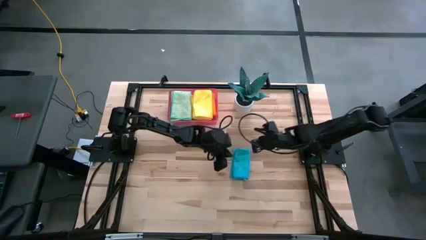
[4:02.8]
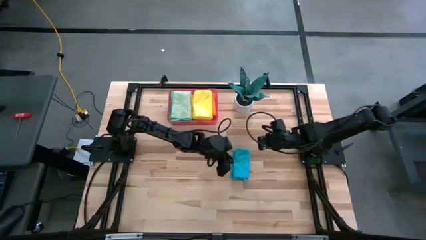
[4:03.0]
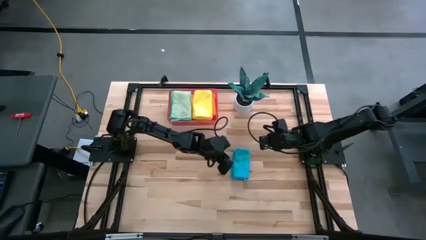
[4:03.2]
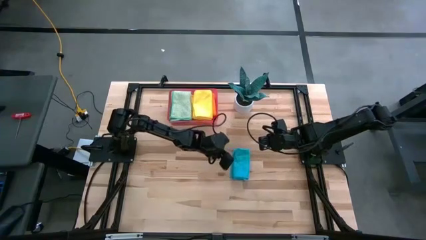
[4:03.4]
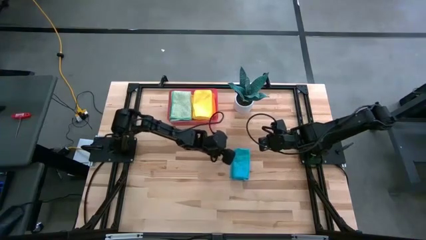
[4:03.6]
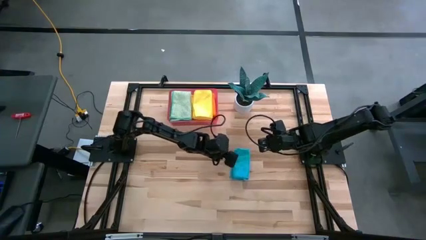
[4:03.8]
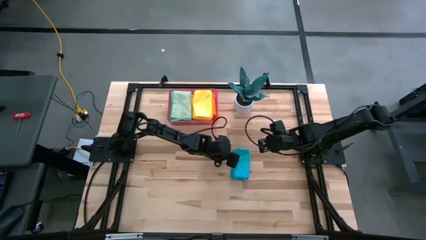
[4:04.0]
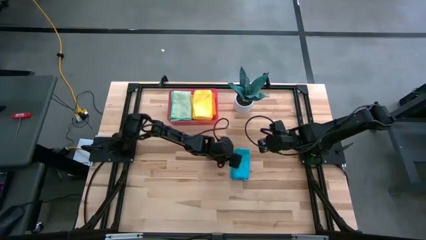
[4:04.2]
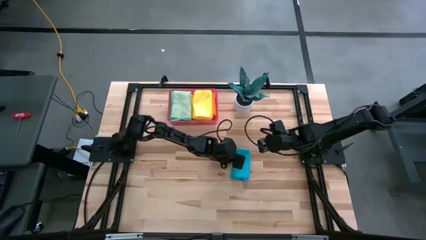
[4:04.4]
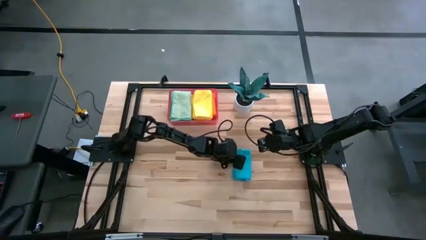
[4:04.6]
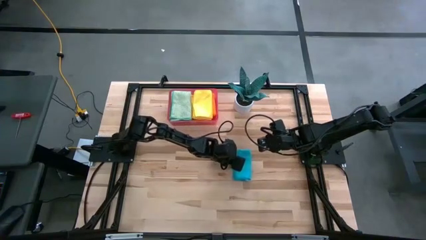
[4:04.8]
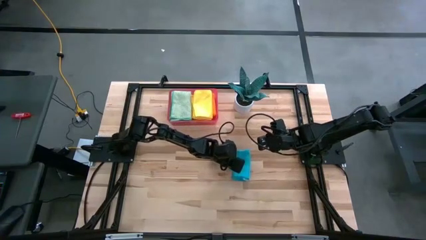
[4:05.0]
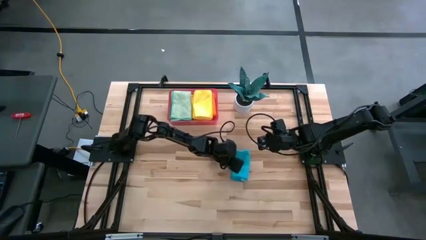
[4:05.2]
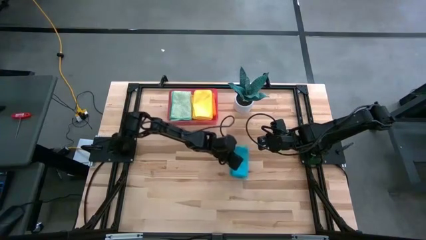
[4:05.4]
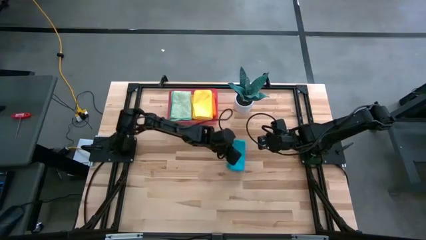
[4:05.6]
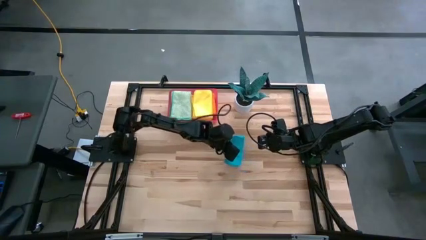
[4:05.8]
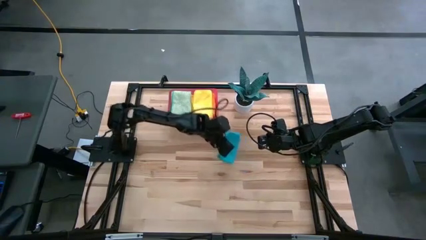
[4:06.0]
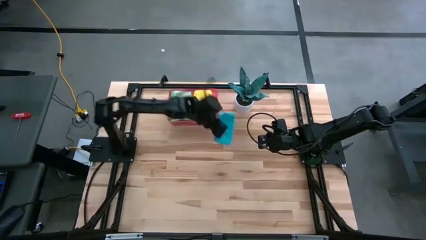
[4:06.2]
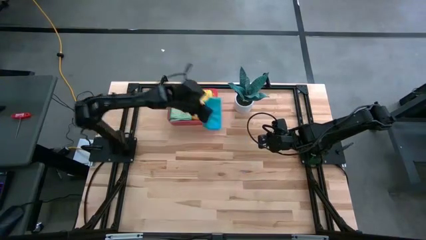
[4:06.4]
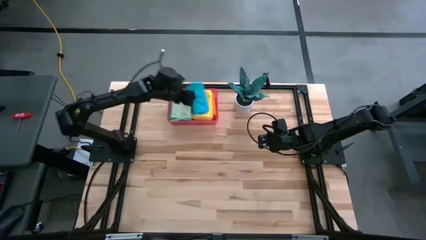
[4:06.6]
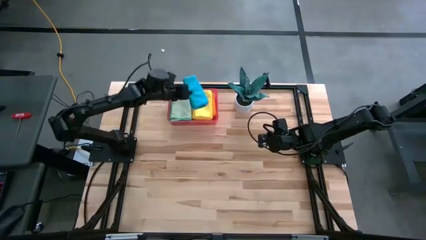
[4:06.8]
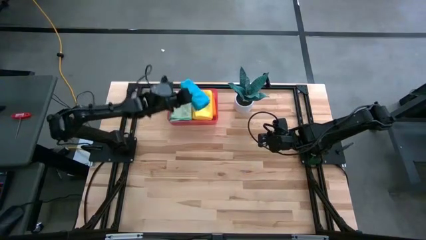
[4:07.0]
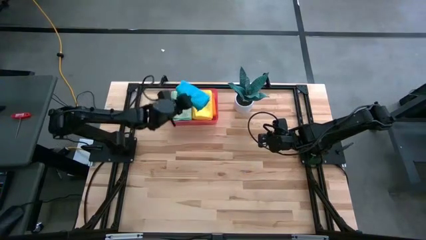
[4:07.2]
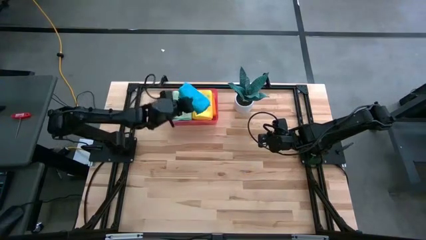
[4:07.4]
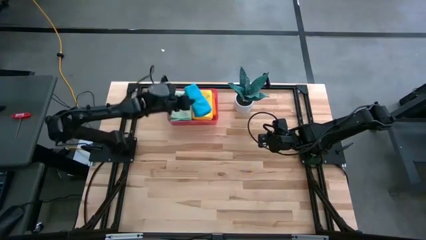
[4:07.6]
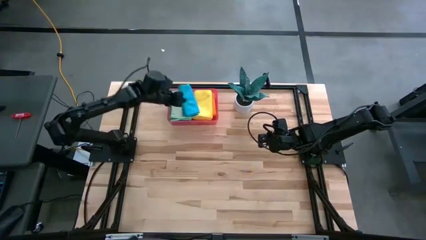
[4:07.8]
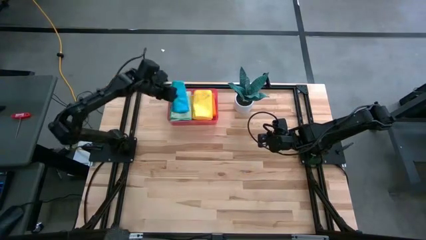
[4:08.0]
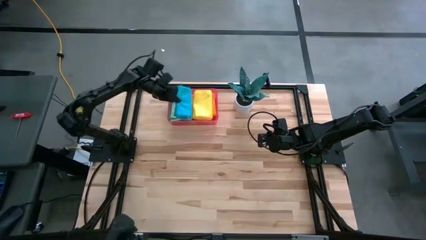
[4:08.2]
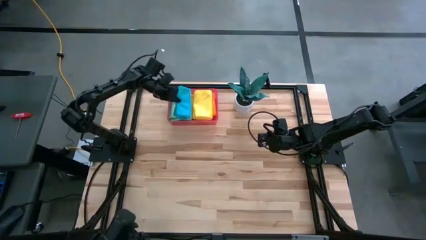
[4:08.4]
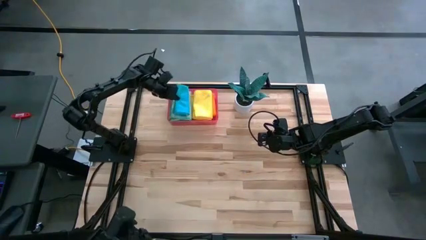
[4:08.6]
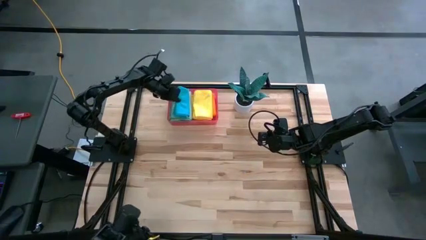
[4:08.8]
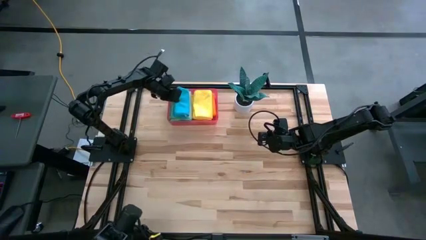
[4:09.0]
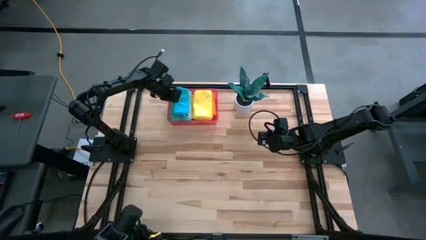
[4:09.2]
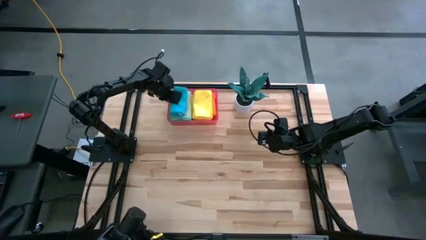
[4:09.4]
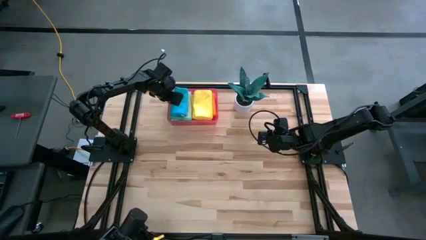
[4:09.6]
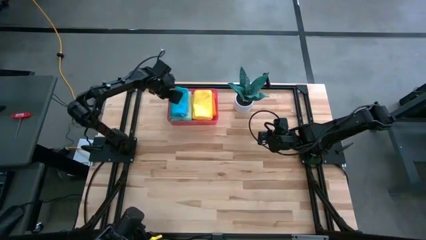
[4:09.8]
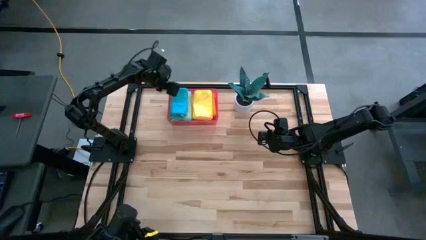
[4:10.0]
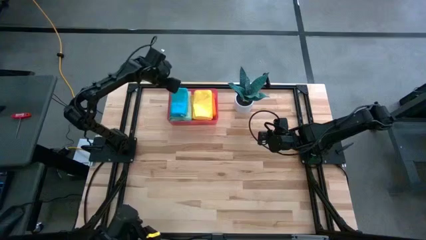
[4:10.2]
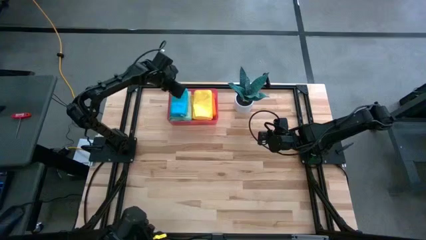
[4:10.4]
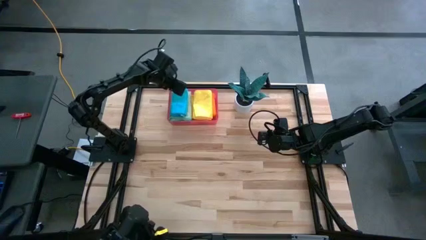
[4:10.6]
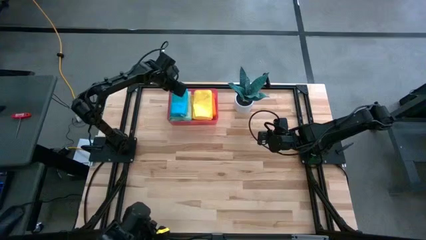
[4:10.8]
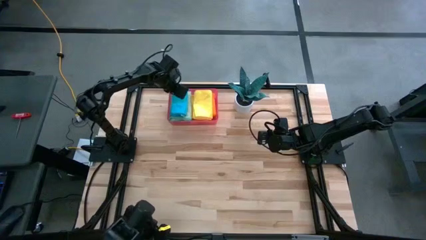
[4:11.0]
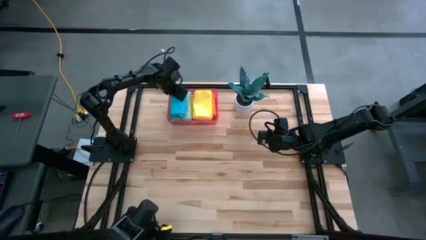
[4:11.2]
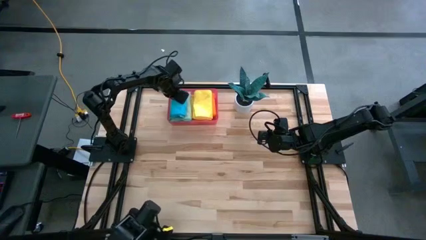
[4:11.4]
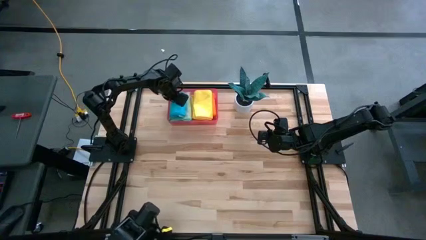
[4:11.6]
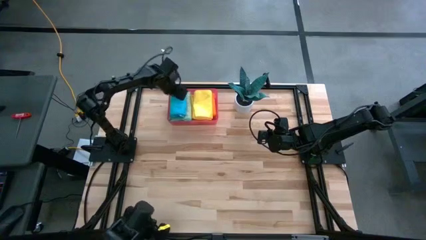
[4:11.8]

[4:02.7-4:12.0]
Task: Fold microfiber towels
Put the blue microfiber towel into the bin

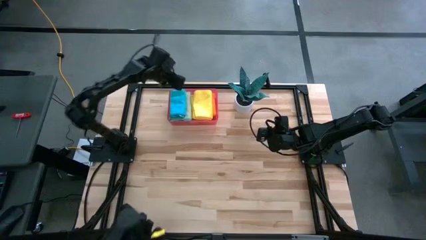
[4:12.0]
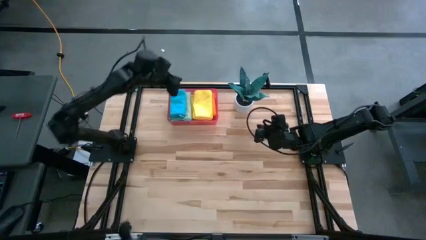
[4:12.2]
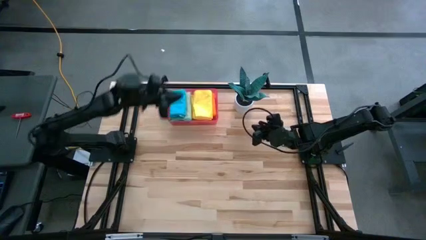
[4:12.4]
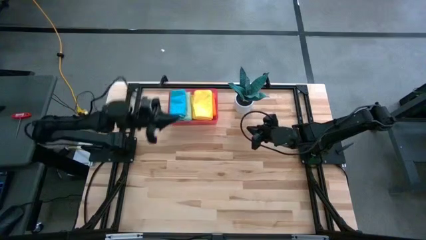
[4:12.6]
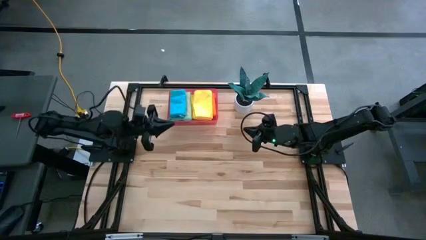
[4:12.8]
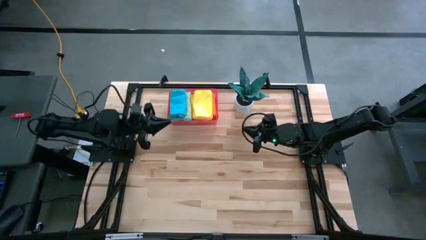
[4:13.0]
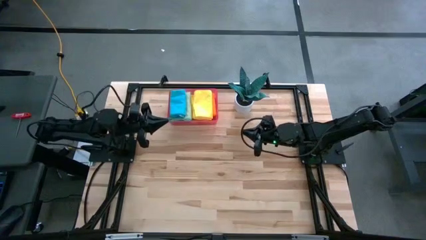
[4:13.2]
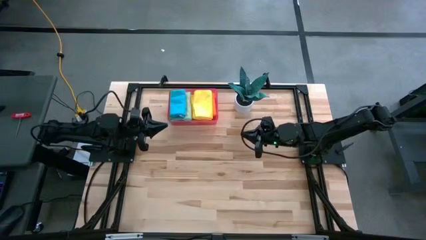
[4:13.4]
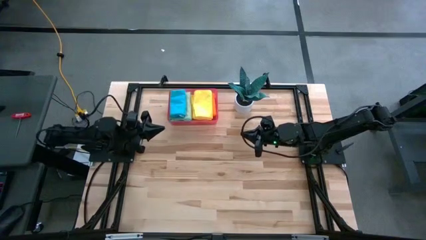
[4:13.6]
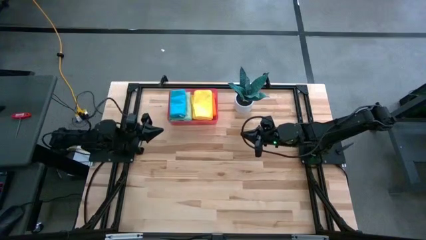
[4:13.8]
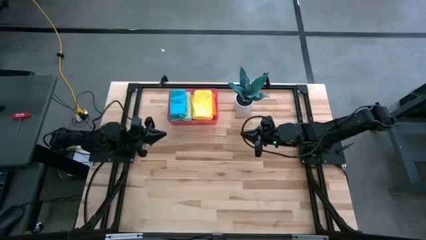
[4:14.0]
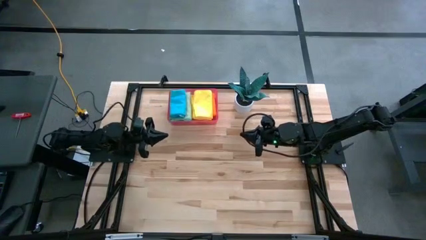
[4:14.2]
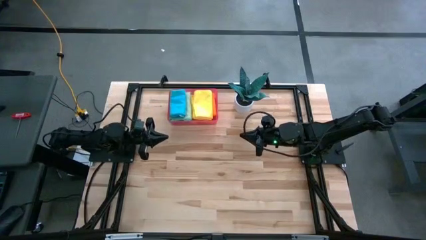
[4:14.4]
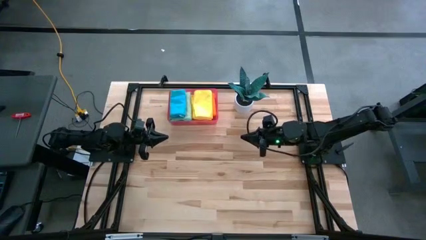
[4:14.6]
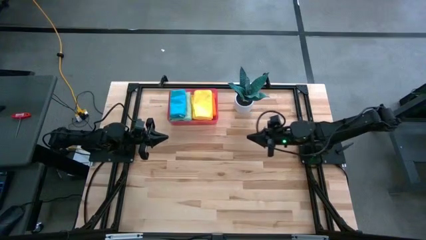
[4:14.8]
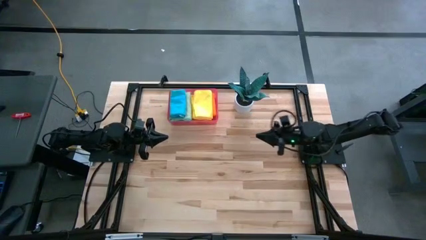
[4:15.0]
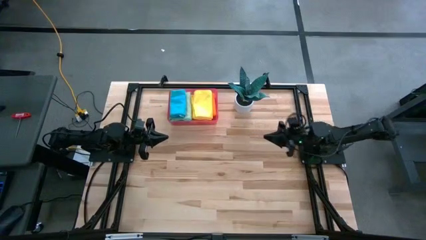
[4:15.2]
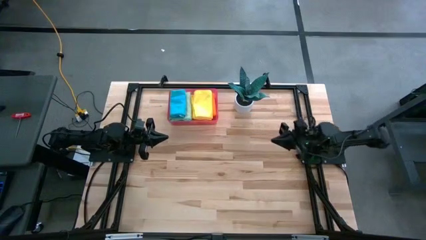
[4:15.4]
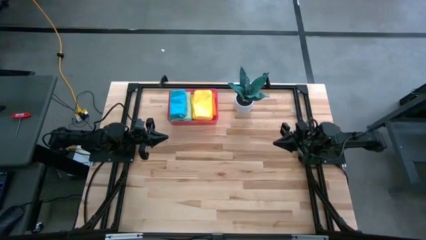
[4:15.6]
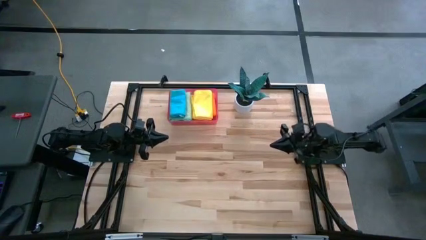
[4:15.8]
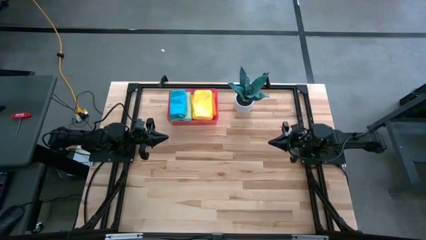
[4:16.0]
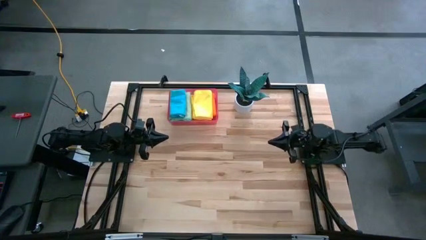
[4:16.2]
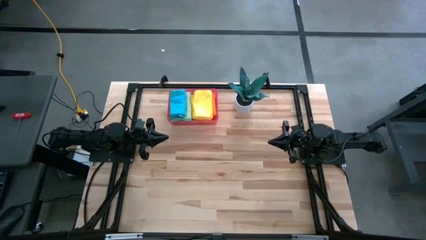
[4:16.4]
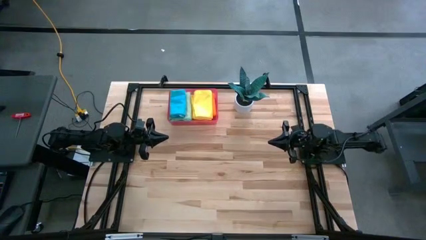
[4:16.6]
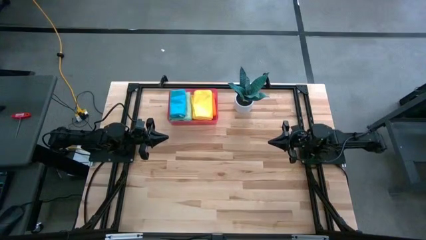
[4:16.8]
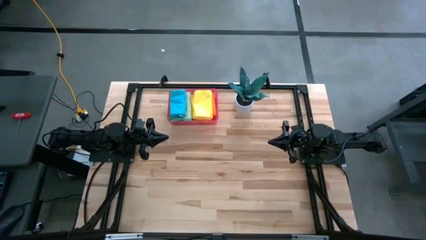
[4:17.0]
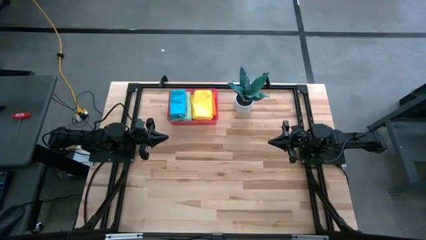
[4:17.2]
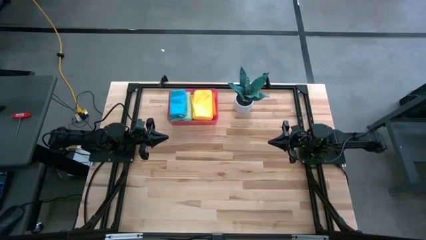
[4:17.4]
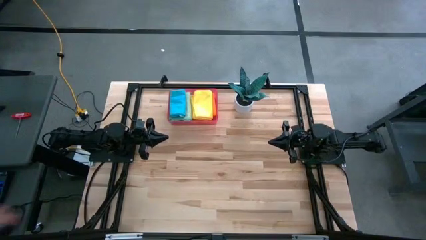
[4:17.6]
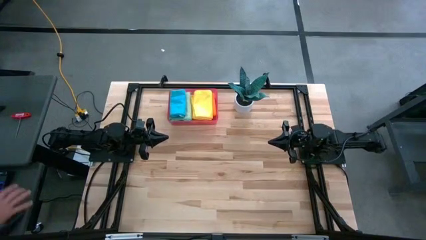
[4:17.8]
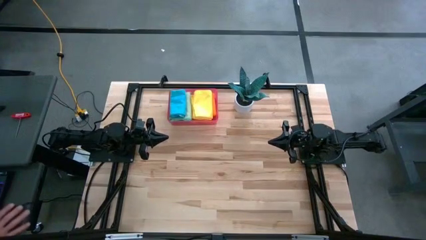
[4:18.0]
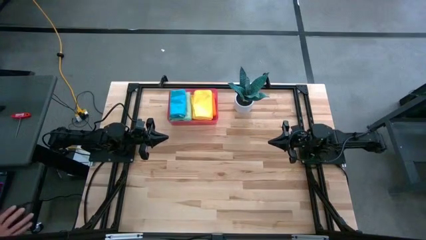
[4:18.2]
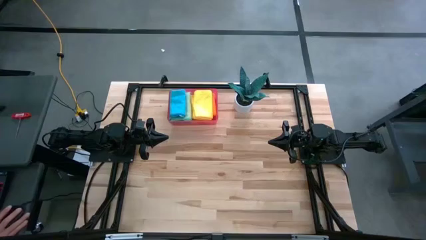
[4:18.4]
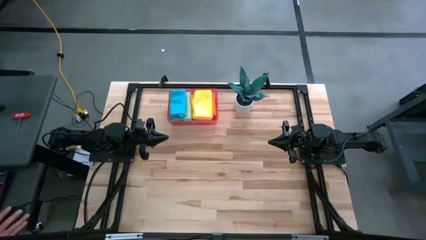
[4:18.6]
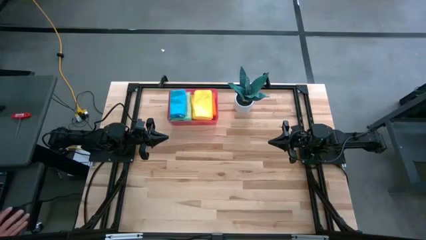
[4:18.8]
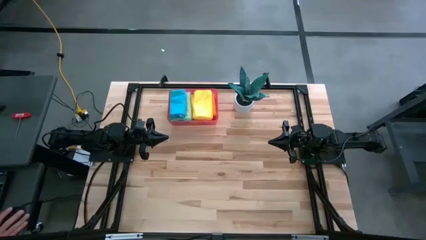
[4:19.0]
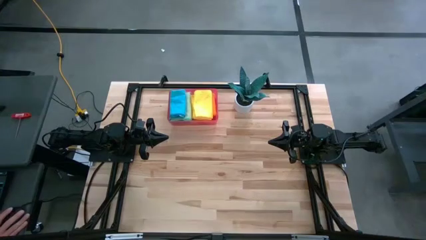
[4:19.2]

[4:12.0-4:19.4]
Return to Home Position
